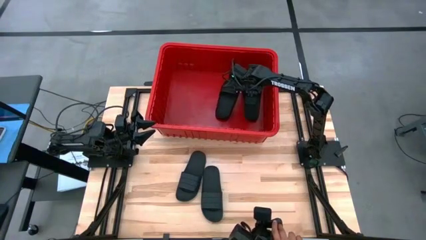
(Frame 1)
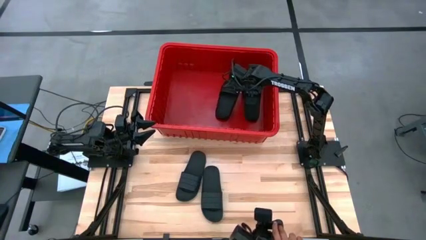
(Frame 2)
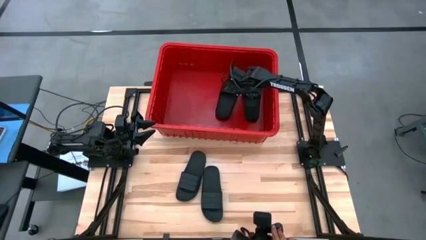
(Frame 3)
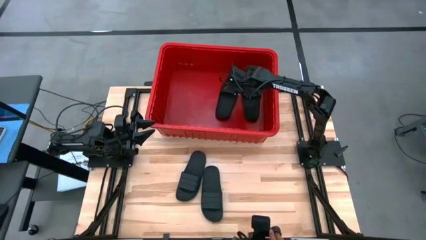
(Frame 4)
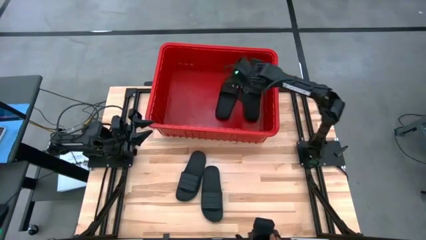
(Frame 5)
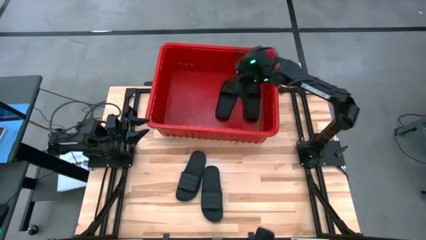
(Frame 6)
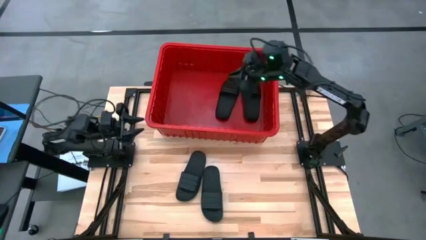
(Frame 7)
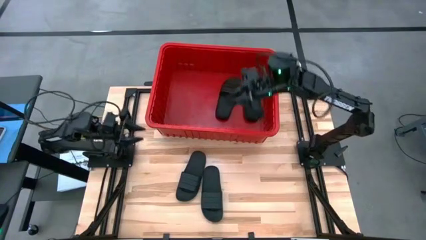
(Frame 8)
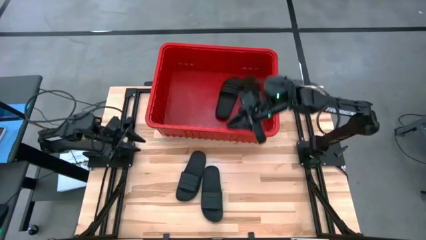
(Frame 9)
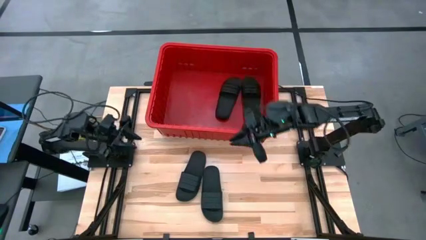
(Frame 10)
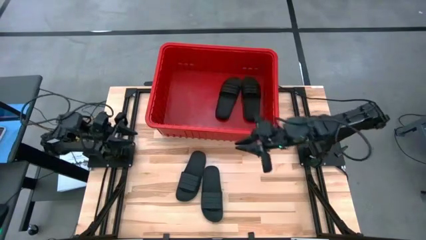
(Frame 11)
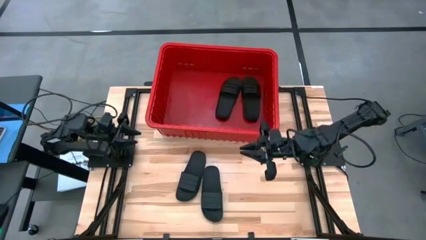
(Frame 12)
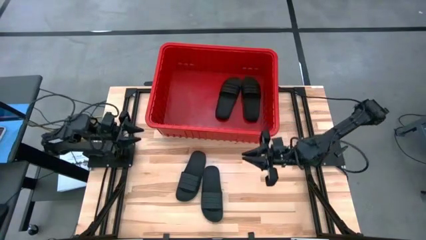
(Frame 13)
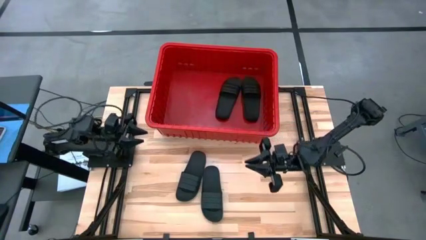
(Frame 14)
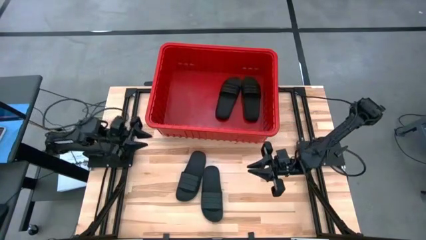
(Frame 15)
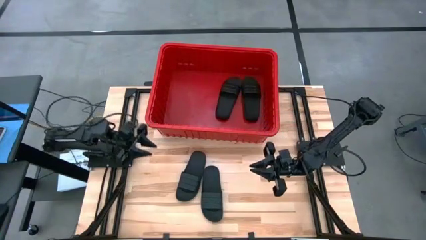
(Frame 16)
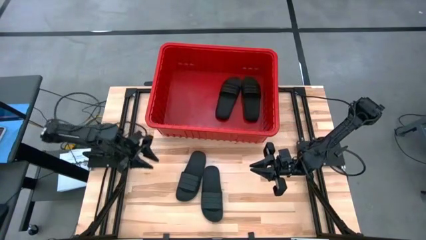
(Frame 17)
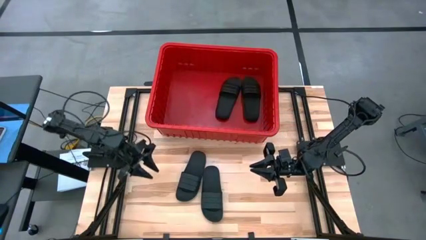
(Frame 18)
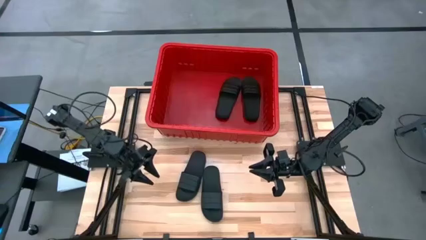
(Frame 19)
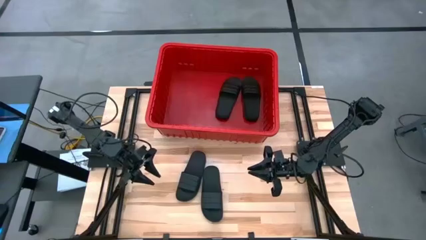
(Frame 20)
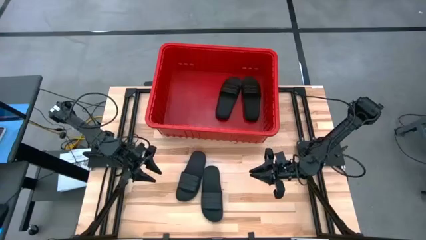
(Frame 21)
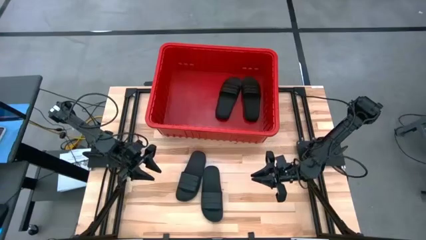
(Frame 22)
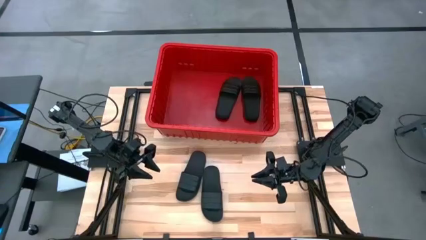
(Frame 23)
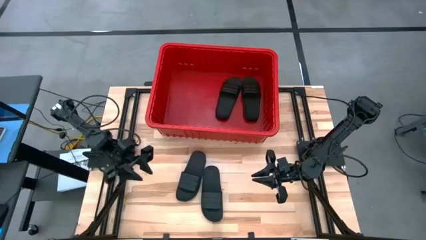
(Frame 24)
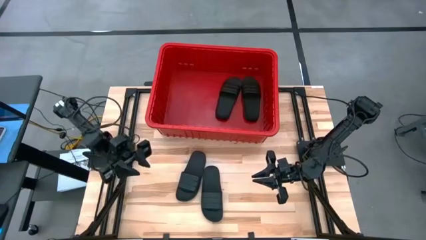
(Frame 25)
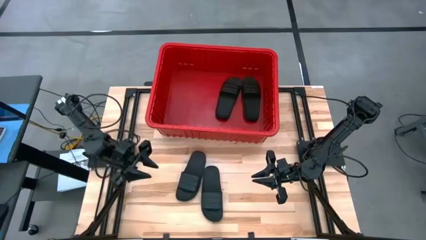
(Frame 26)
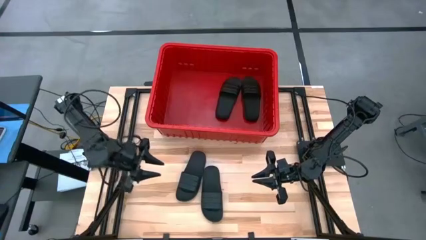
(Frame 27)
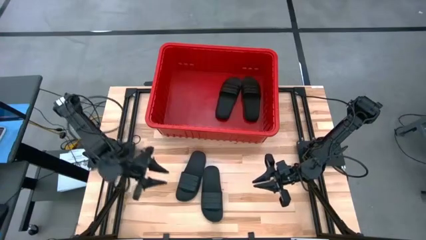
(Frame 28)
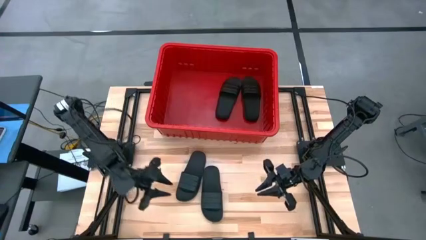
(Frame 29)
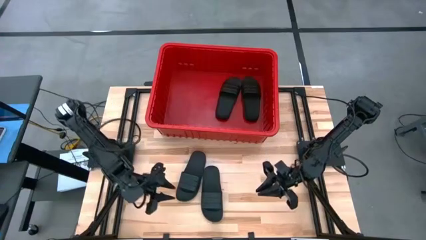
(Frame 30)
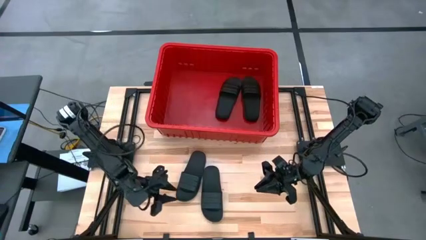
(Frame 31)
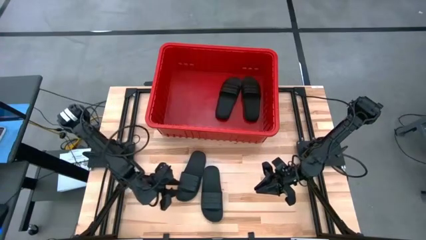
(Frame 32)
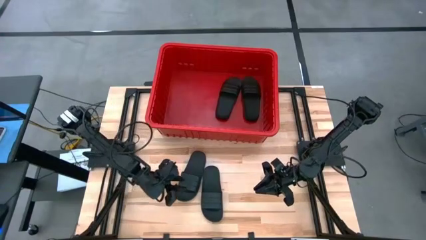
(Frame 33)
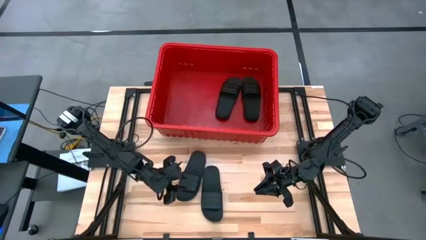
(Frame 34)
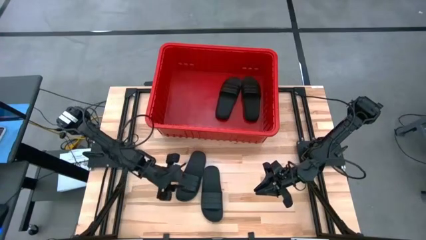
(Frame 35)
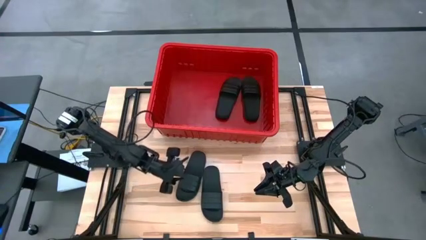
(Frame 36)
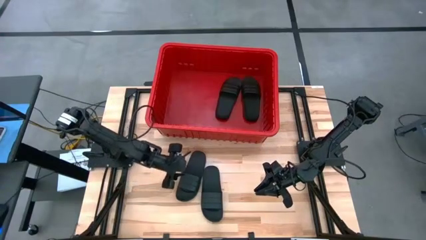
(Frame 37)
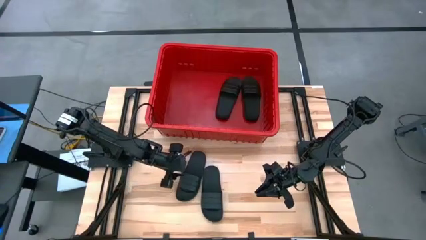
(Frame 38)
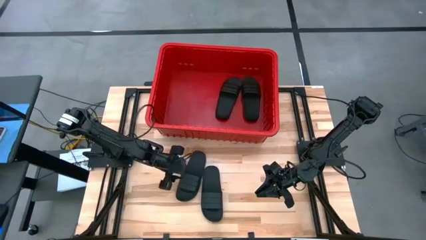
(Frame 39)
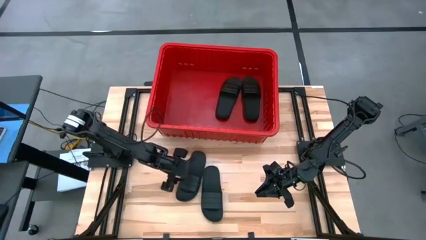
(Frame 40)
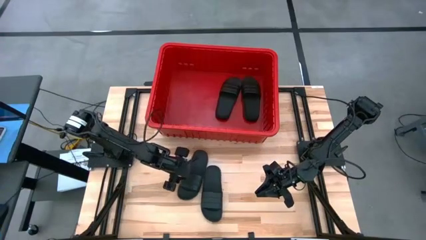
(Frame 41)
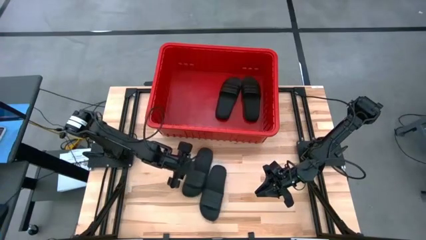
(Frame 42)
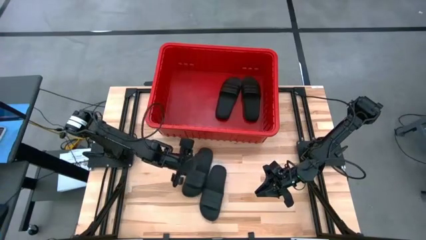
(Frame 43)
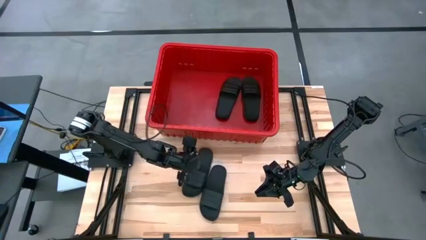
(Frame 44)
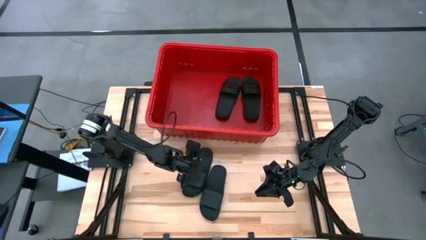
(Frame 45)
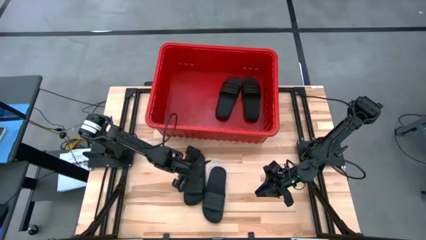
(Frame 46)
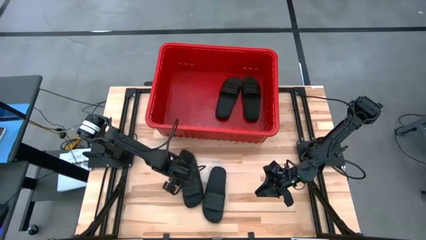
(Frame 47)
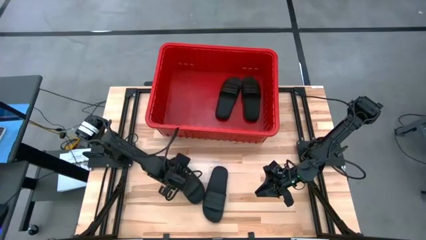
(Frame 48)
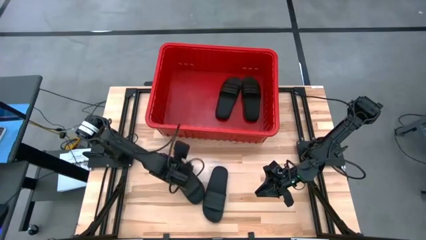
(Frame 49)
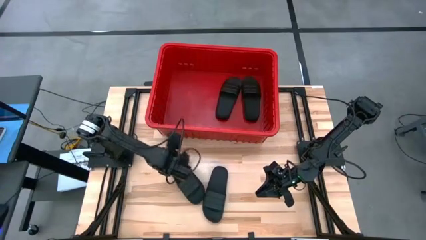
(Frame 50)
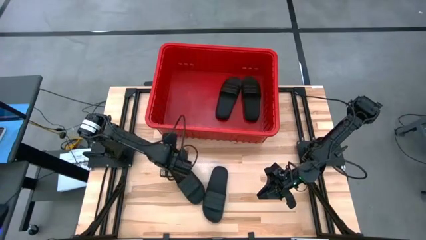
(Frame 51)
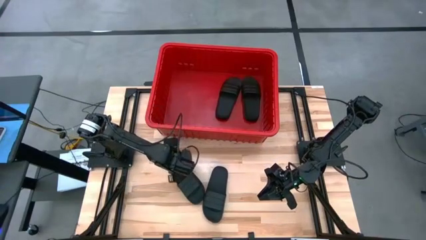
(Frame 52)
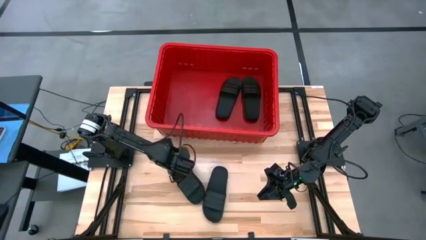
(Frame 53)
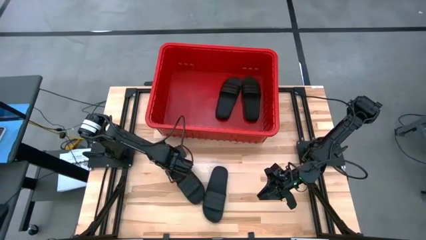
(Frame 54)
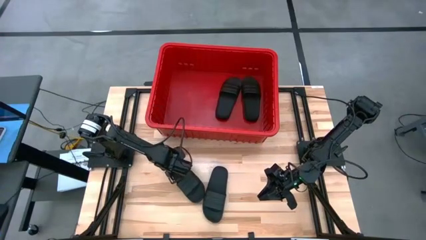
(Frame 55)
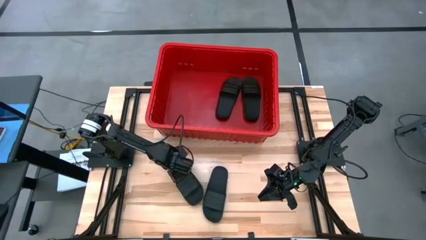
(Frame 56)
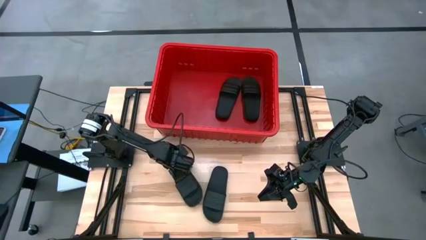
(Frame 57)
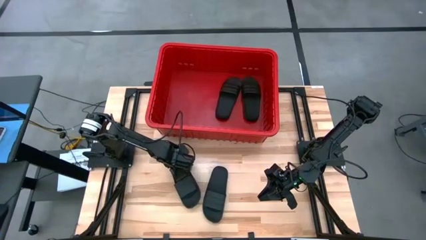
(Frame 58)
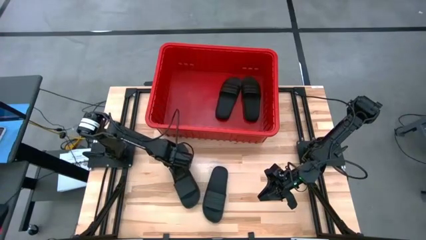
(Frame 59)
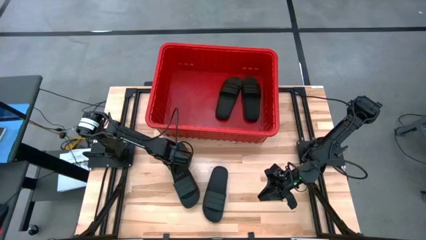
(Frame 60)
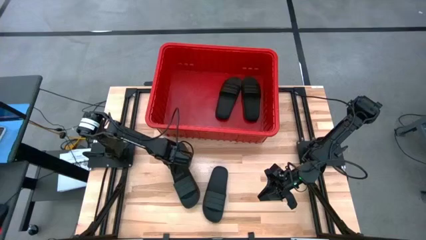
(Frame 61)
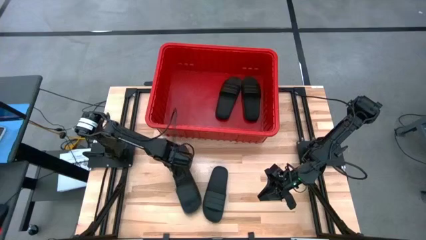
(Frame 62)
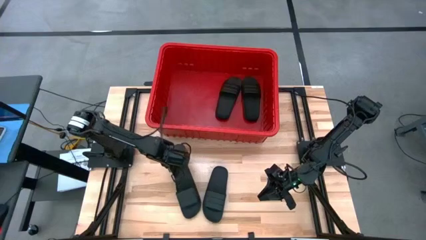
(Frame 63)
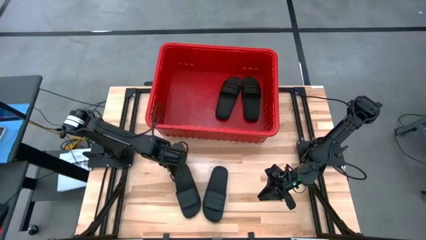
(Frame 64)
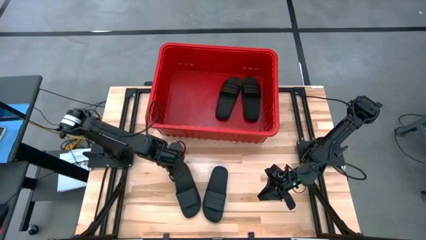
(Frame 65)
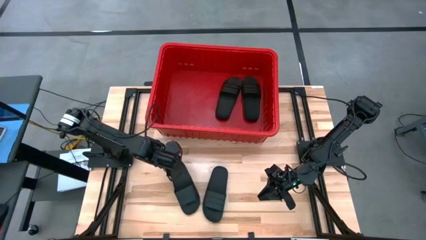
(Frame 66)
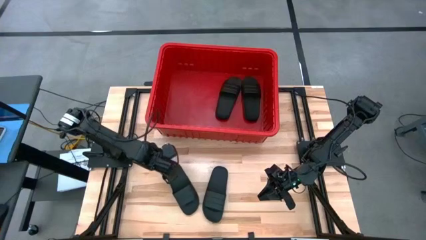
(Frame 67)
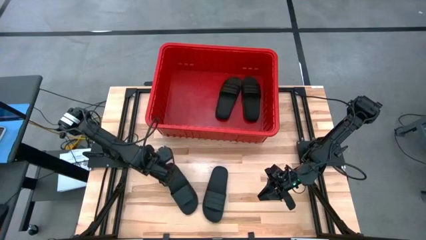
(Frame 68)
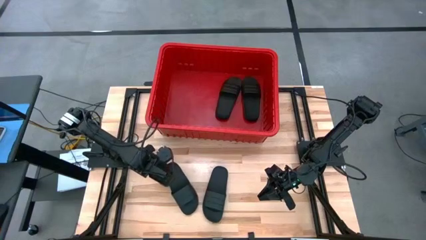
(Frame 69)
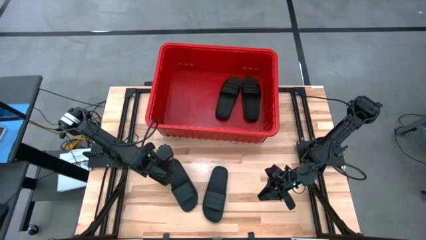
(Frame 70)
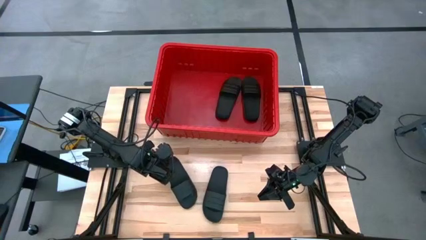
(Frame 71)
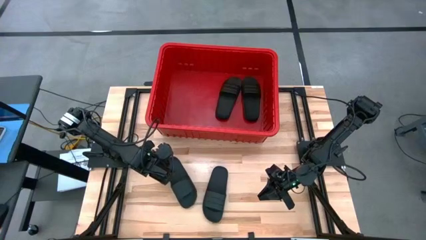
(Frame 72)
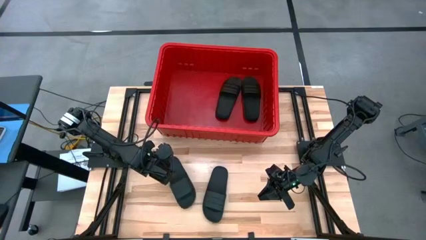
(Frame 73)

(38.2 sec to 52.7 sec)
Task: Pick and place slides into bin
Put the black slide into the red bin

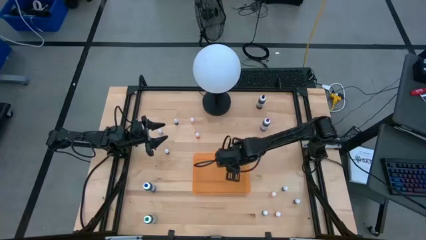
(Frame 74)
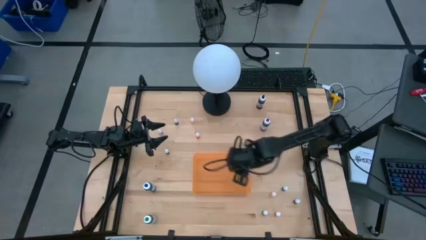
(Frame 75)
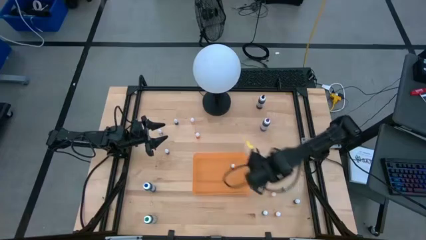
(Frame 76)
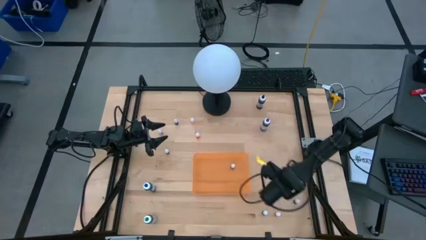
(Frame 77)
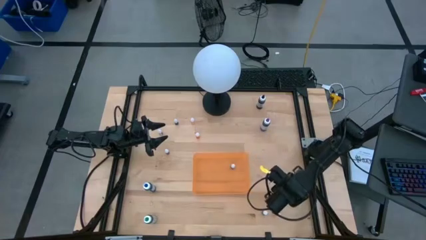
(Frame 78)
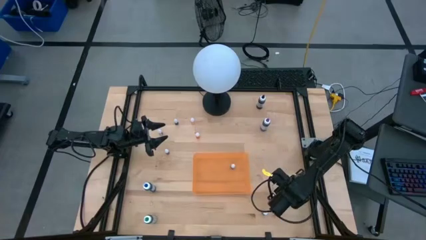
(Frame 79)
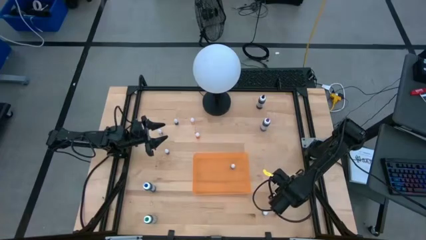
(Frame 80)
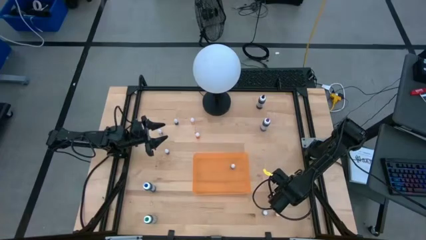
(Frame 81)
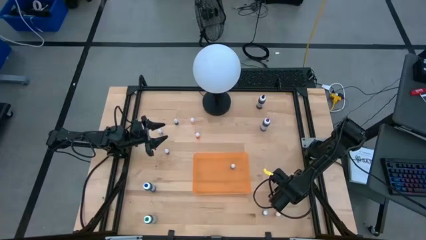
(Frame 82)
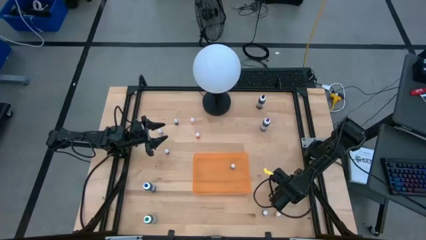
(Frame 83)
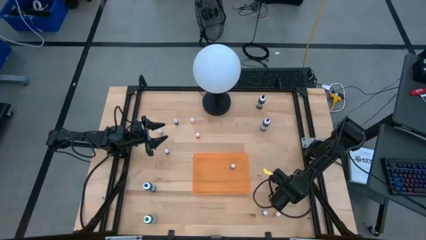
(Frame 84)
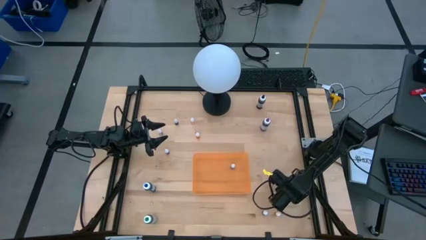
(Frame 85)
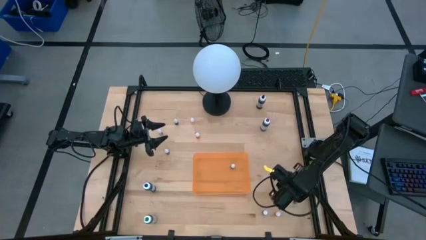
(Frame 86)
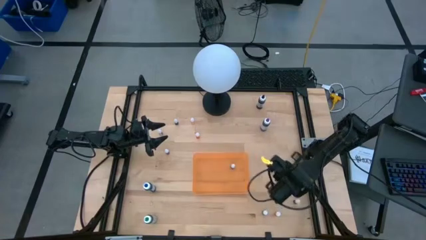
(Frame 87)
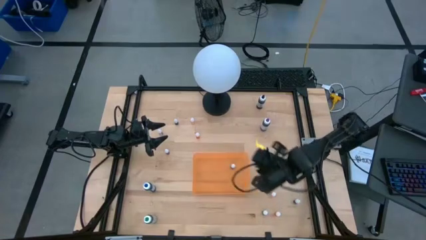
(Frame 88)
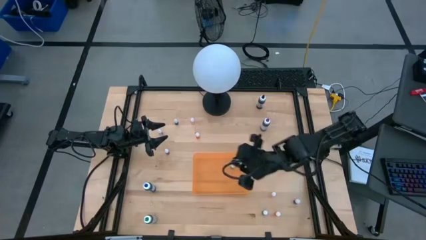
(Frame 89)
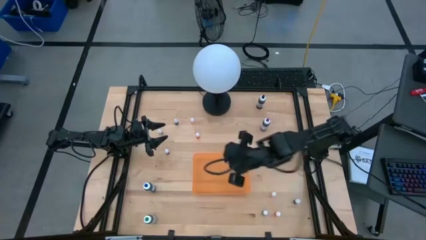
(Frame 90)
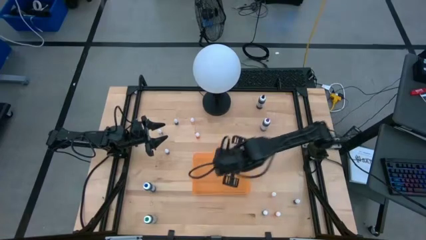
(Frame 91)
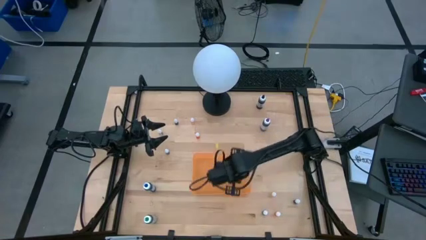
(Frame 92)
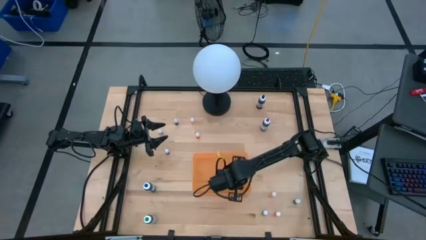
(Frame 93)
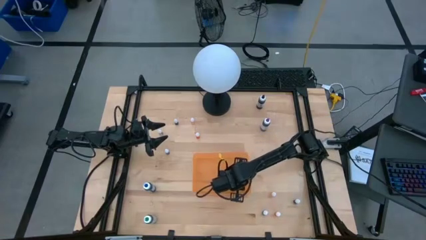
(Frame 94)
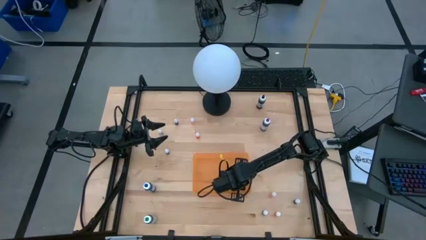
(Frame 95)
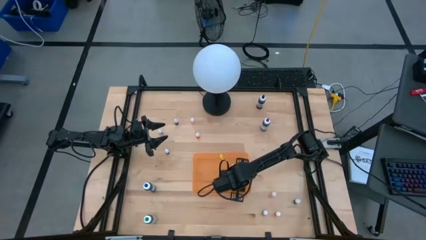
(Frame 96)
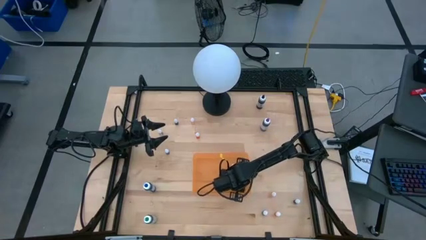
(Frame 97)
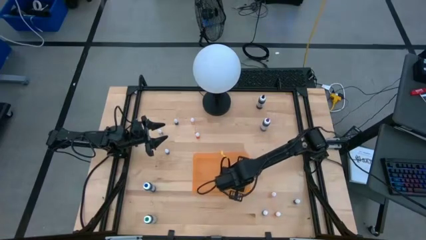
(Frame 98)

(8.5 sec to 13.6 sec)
Task: Pick & Place food coloring
Put the small black food coloring bottle into the orange container
